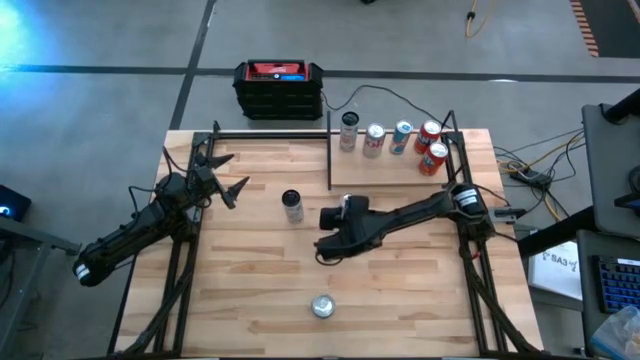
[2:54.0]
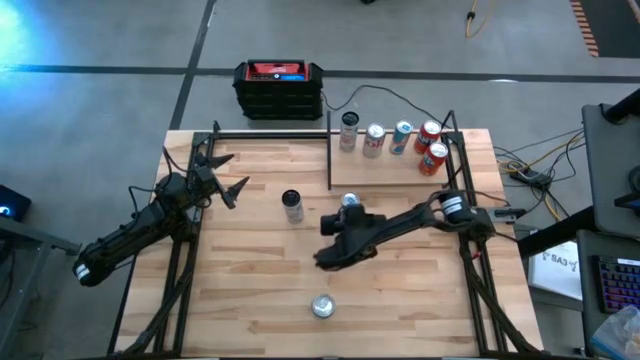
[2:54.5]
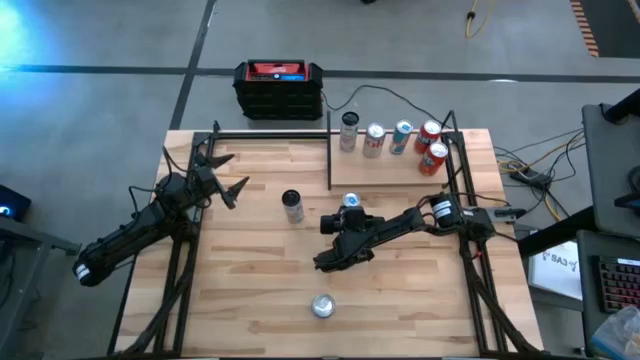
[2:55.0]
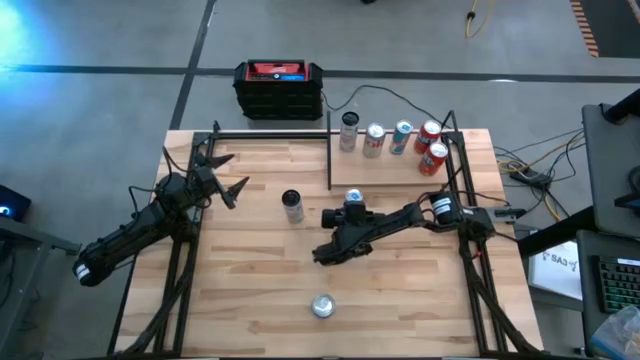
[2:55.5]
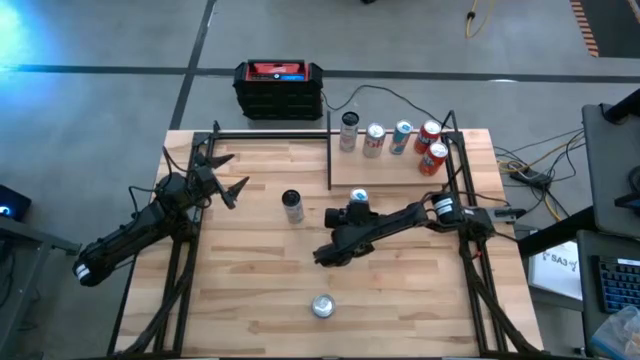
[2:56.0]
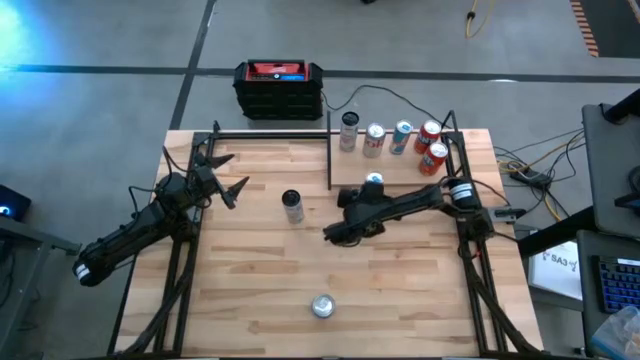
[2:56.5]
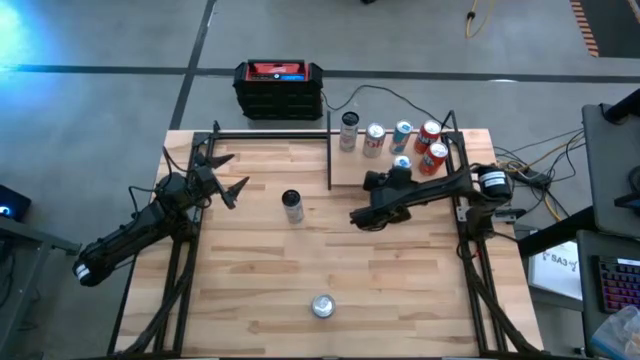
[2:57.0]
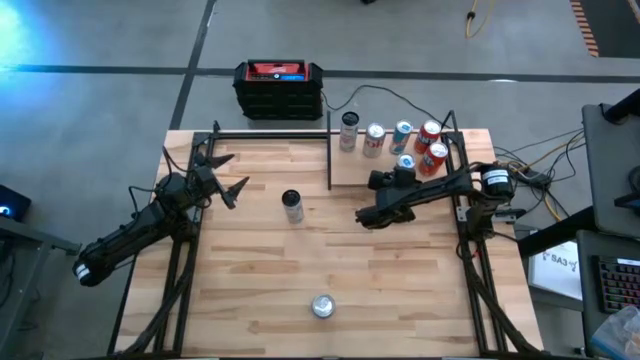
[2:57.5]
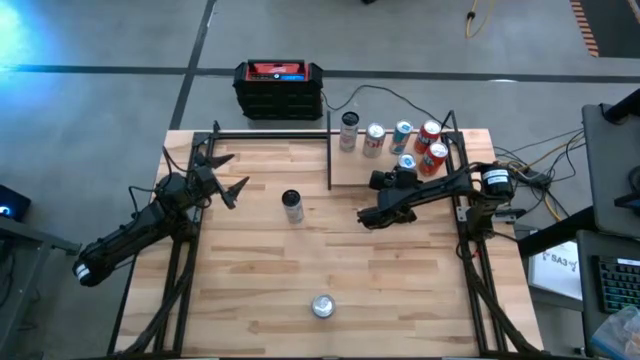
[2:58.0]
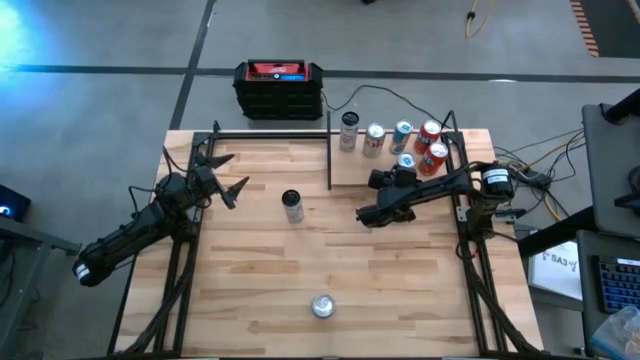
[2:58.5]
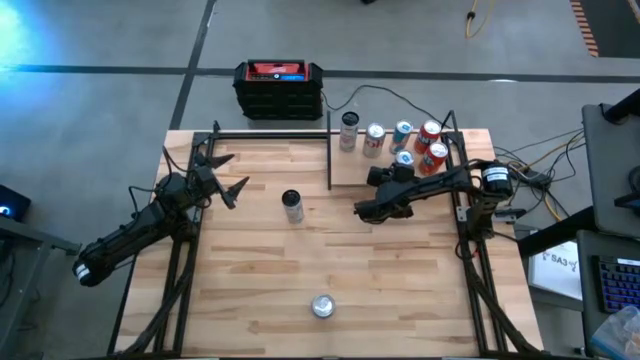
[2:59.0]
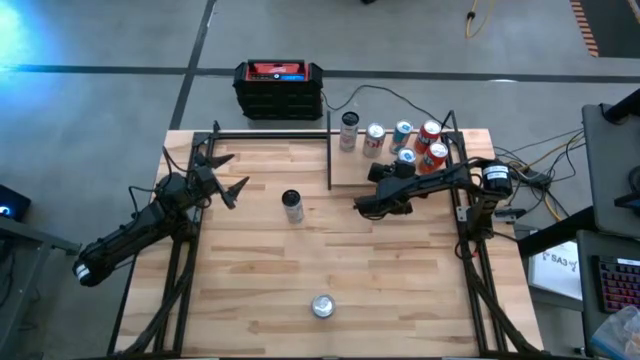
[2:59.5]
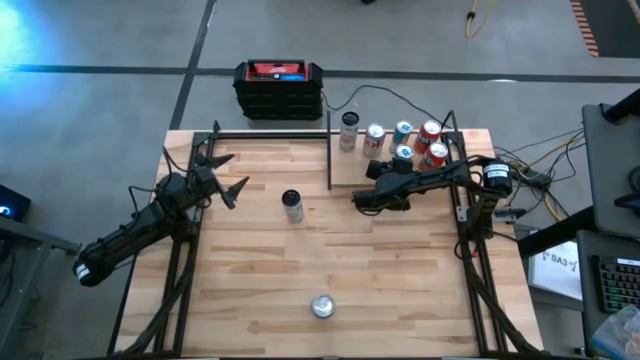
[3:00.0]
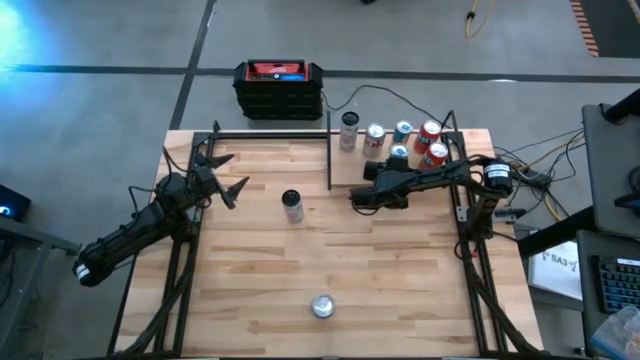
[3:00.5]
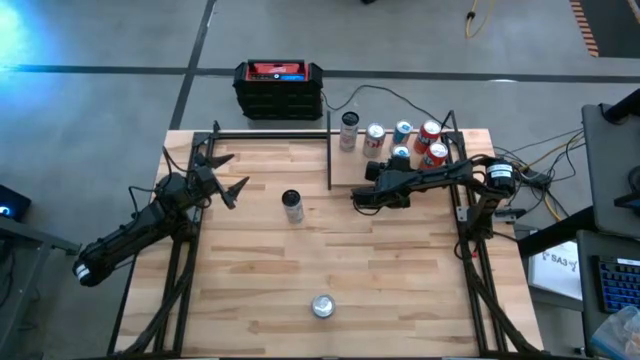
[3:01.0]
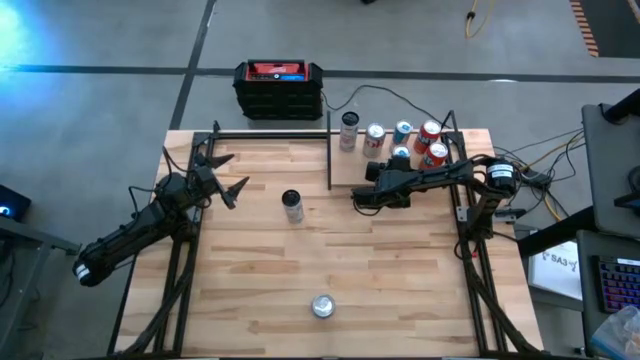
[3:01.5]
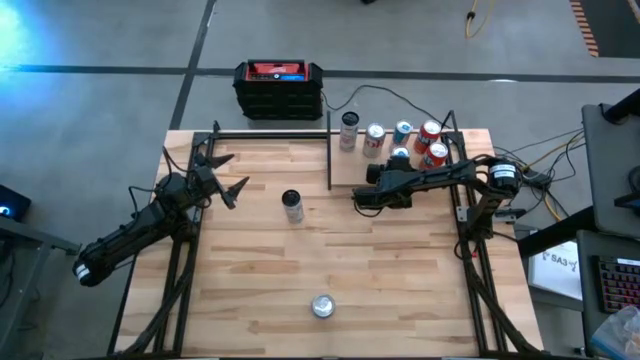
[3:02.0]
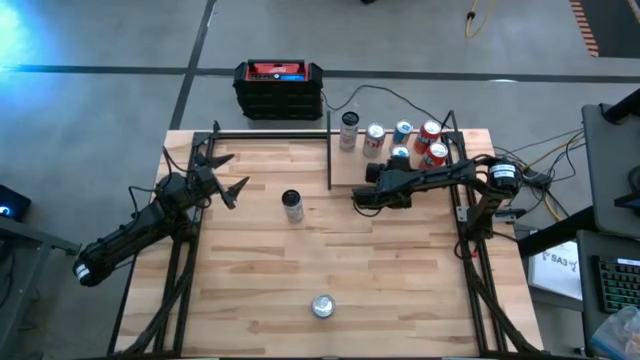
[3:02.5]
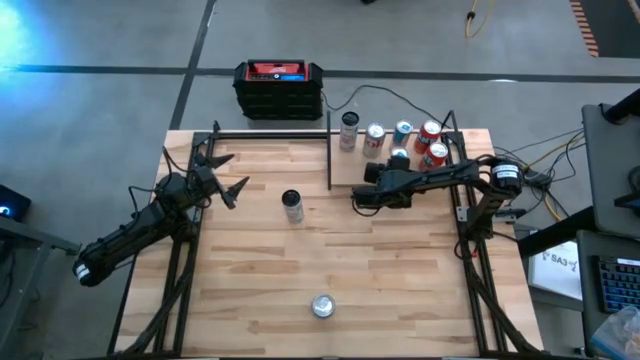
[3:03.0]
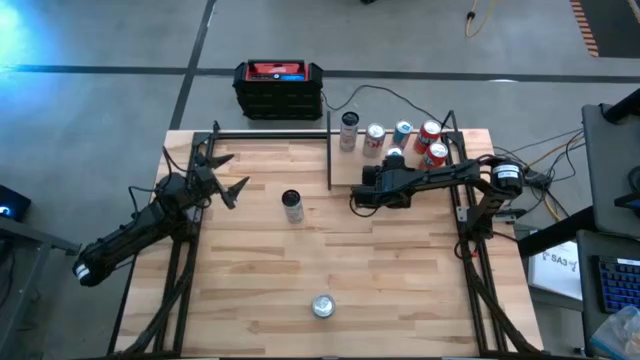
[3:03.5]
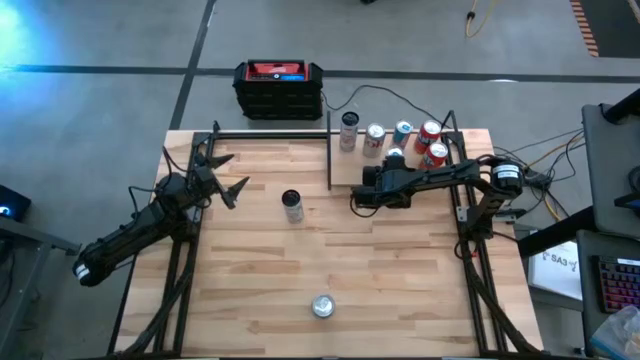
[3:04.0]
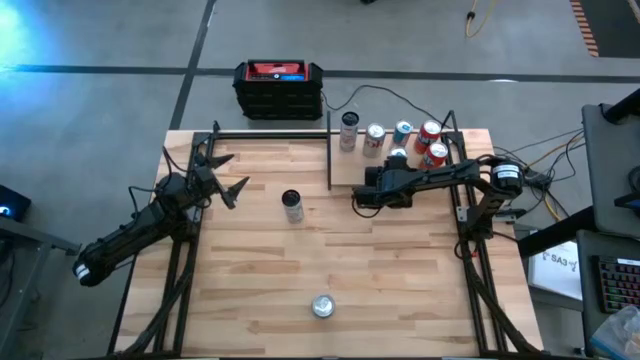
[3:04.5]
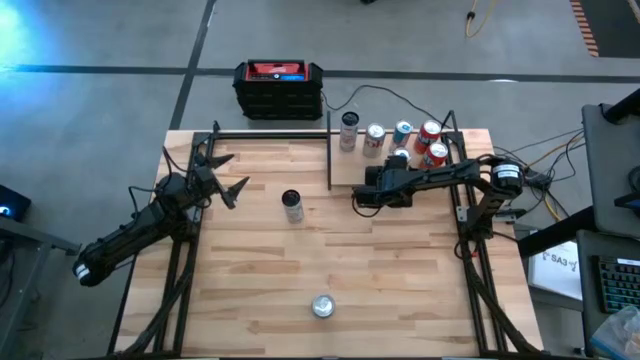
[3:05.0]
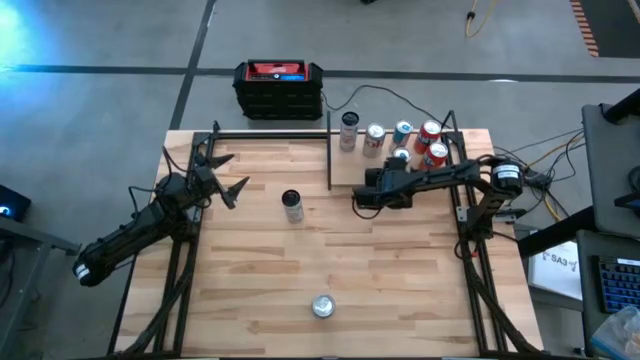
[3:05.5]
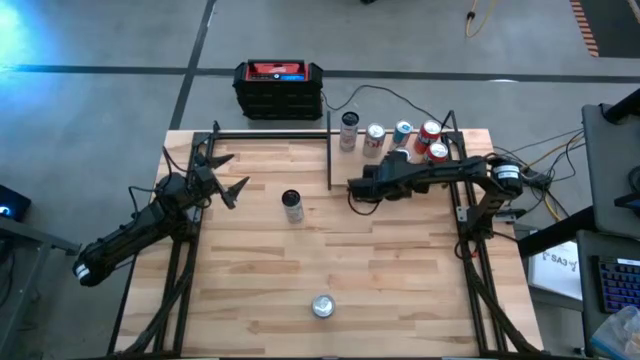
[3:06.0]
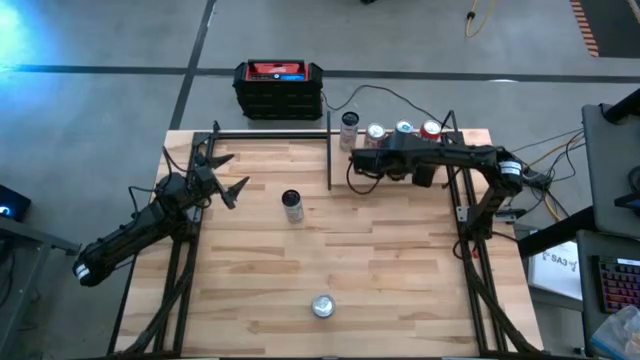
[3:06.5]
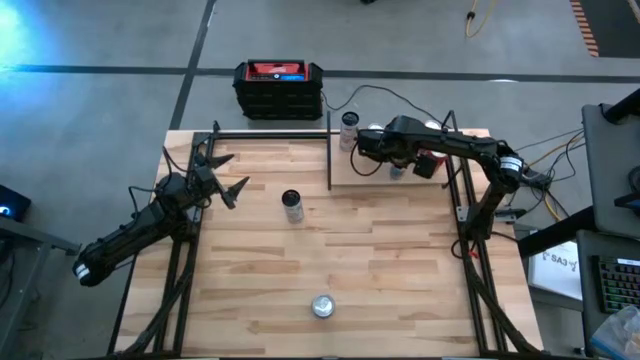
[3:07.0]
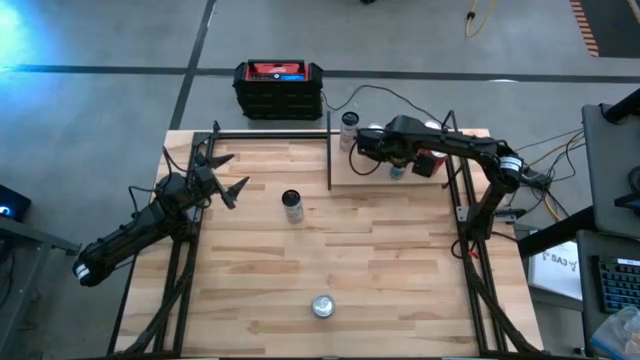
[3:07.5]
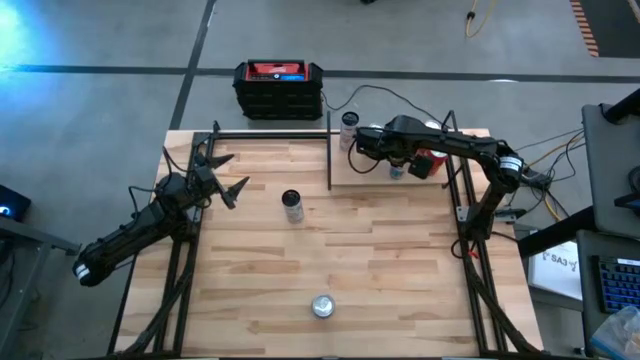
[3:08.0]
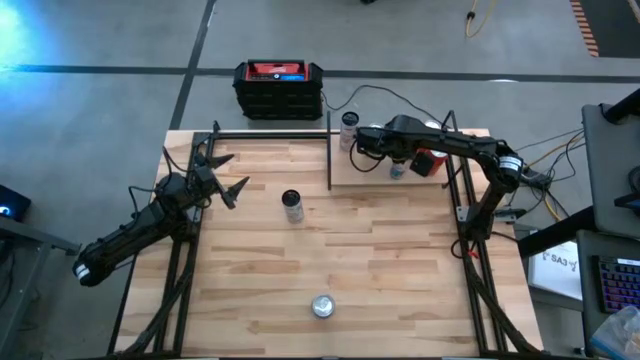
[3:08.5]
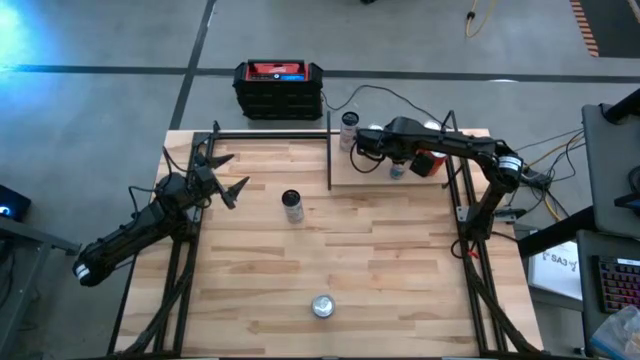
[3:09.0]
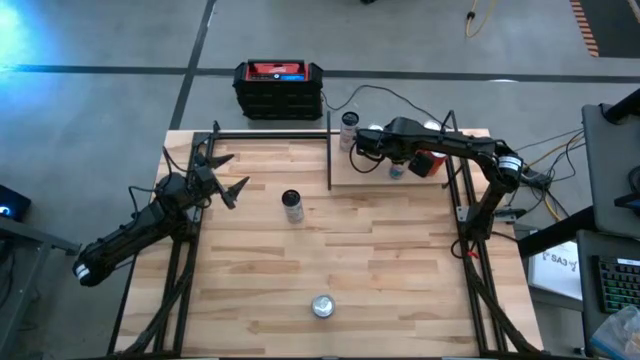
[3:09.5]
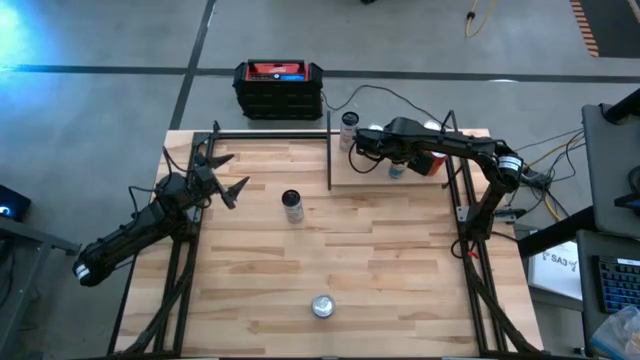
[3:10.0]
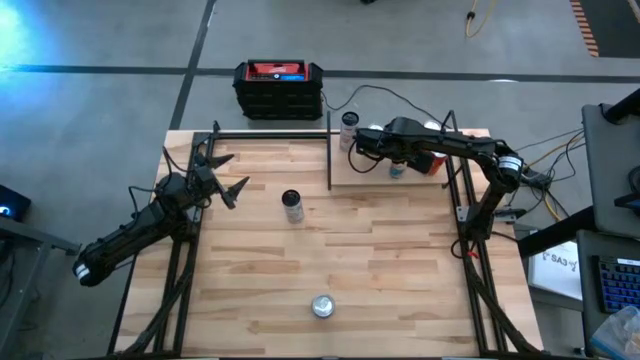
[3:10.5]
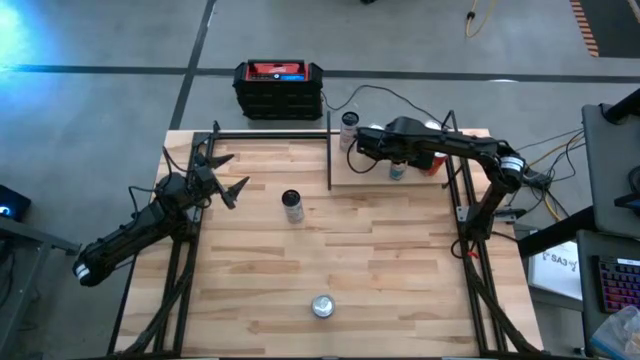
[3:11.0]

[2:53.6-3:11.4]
Task: Place canned beverage on shelf
Put the blue soda can on the shelf aligned with the other blue soda can

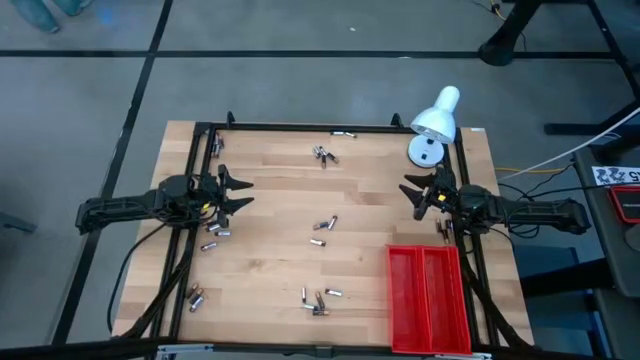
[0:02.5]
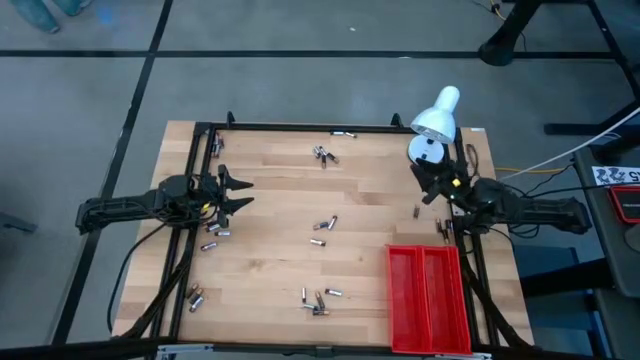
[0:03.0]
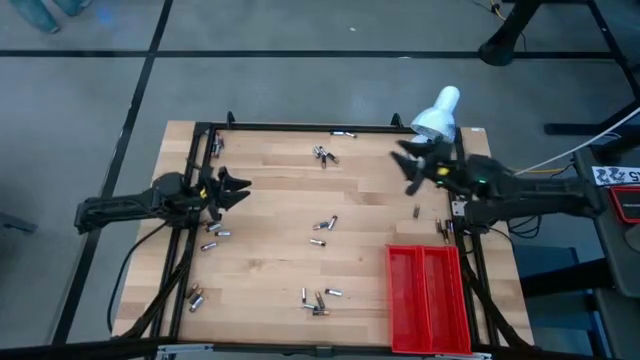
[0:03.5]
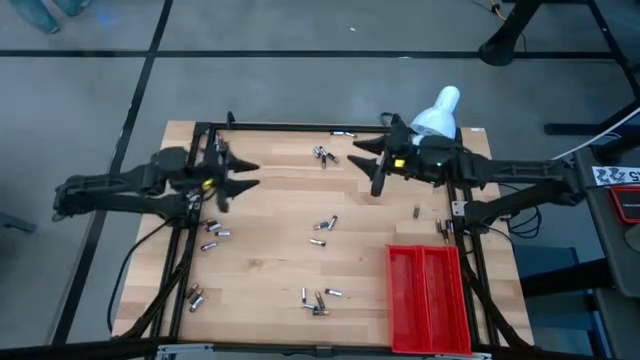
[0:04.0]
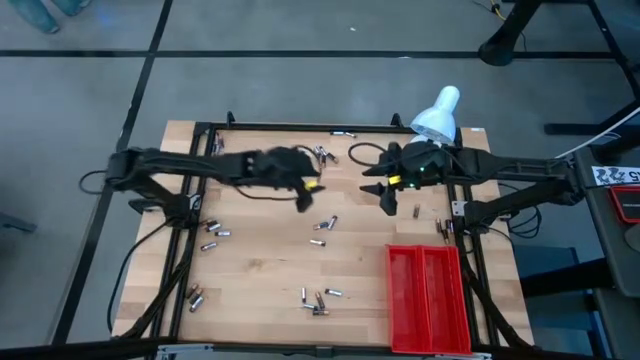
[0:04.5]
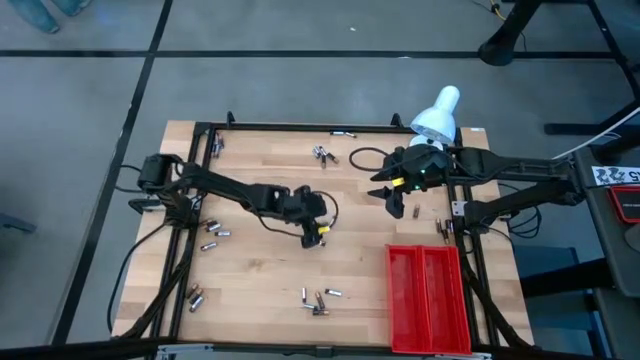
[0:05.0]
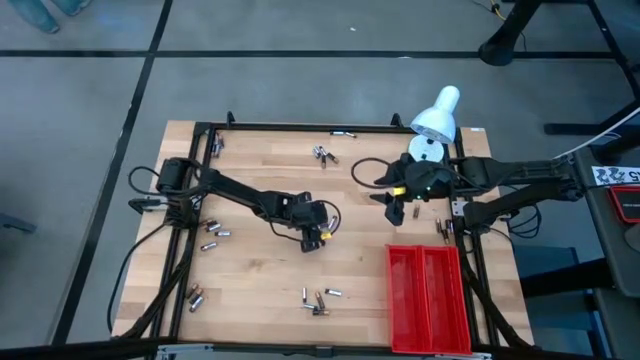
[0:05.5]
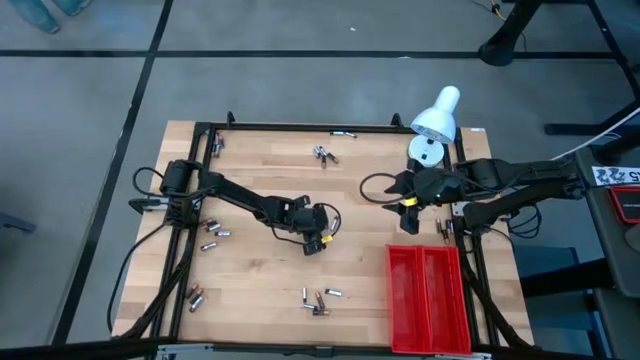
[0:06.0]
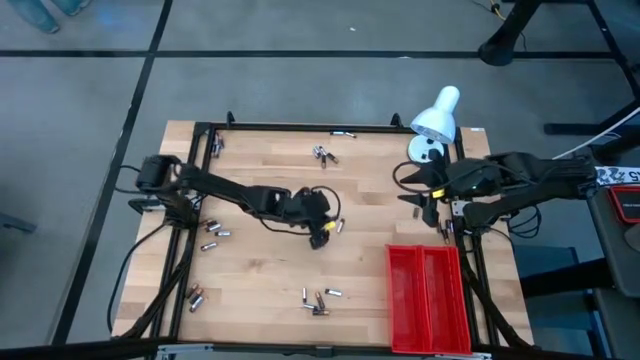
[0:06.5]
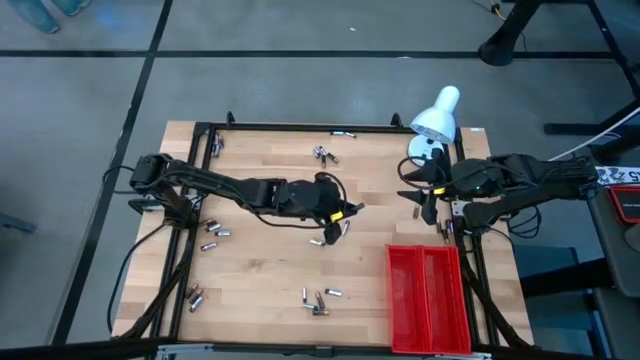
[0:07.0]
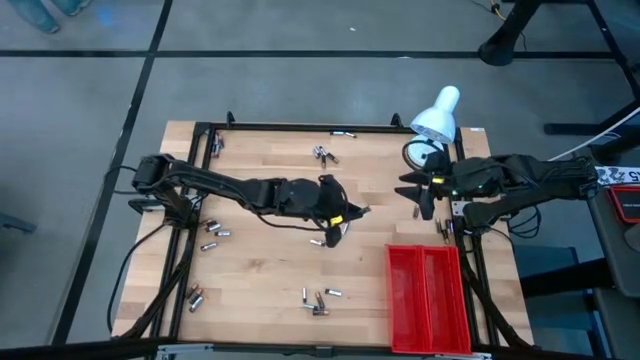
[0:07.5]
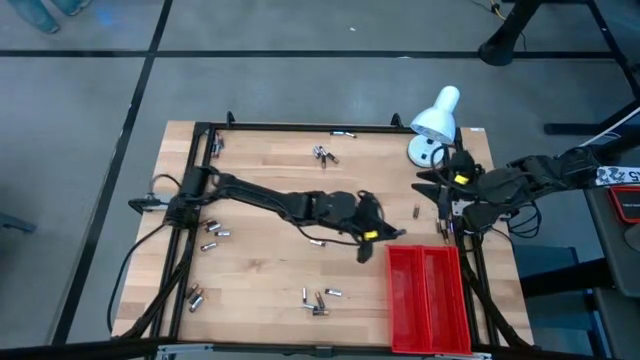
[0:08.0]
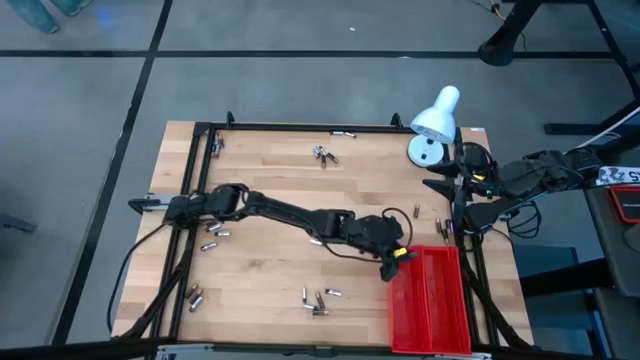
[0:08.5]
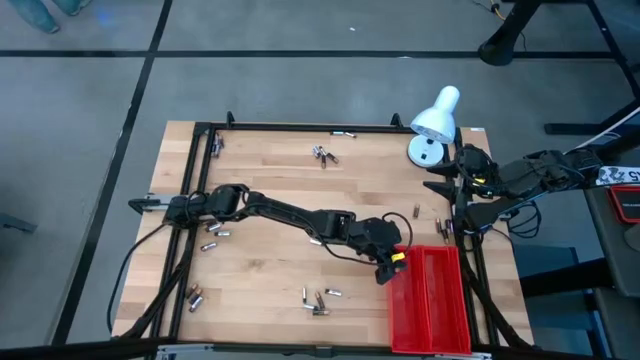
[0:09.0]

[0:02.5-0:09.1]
Task: Sort batteries
Put the black battery into the left red bin
